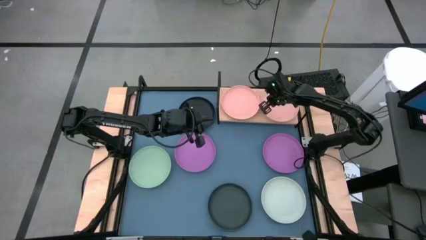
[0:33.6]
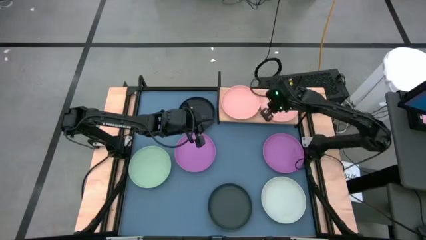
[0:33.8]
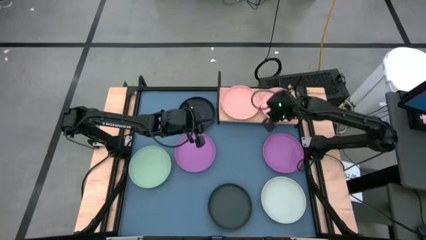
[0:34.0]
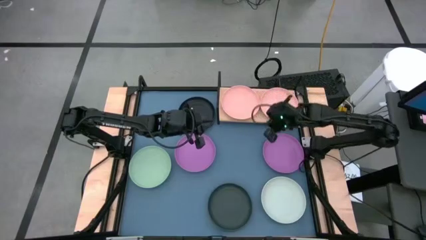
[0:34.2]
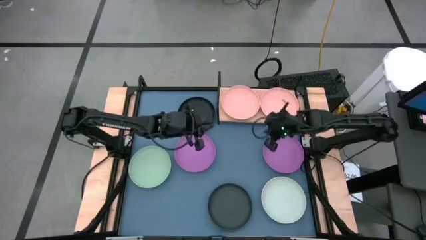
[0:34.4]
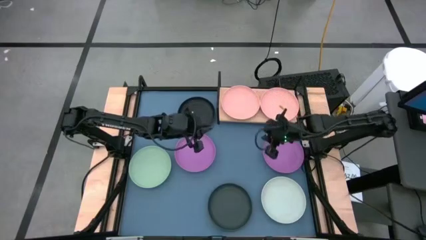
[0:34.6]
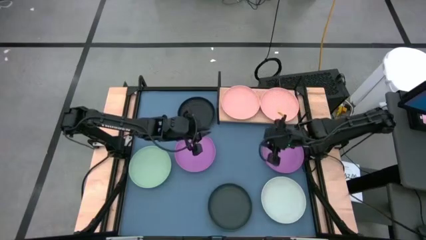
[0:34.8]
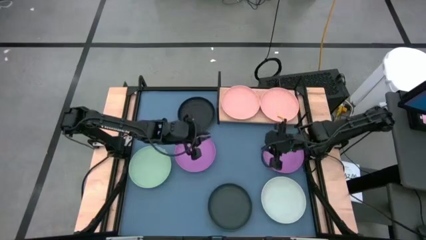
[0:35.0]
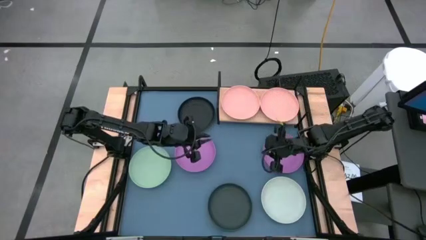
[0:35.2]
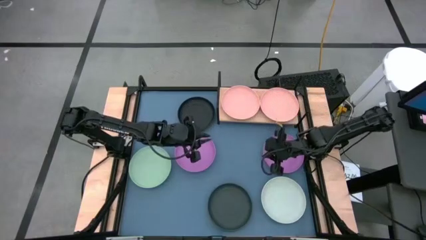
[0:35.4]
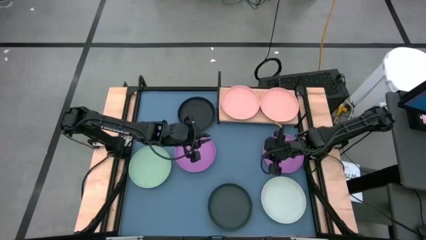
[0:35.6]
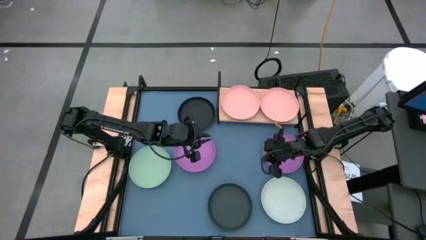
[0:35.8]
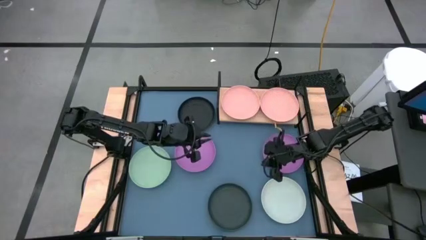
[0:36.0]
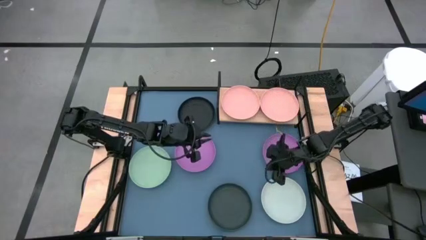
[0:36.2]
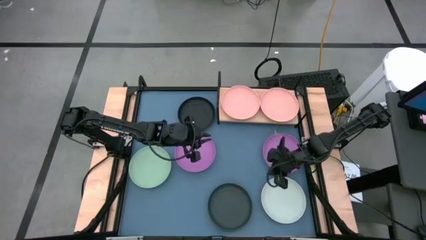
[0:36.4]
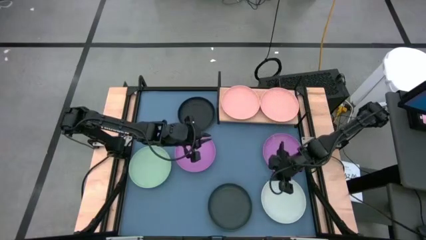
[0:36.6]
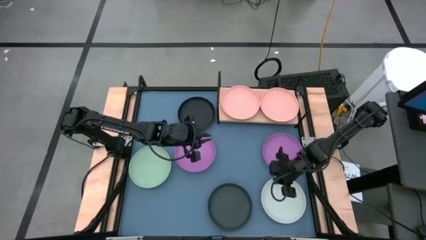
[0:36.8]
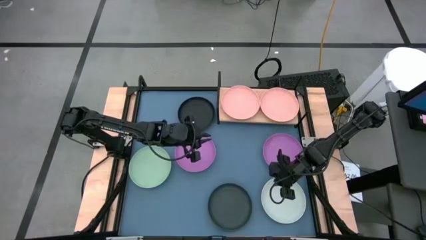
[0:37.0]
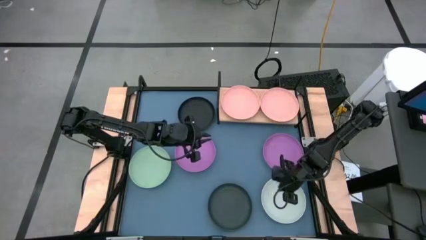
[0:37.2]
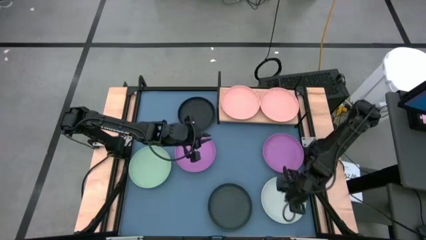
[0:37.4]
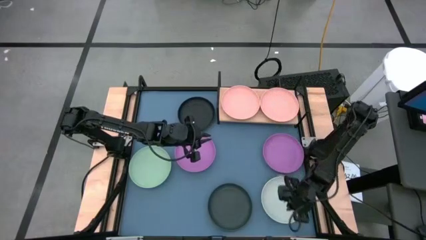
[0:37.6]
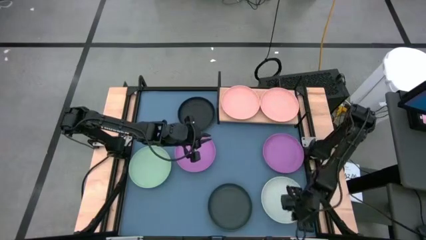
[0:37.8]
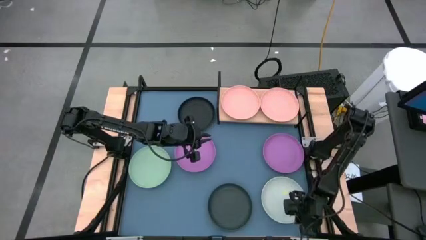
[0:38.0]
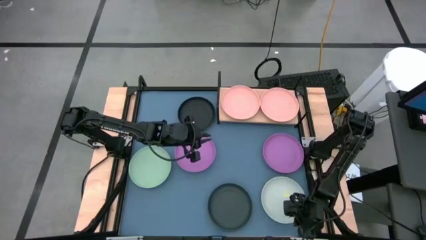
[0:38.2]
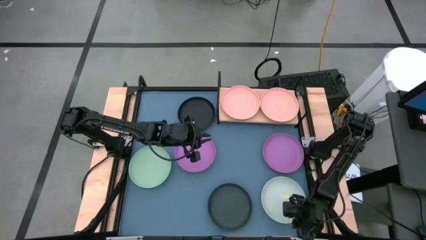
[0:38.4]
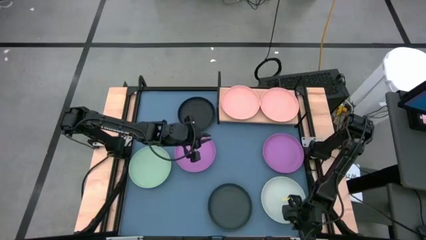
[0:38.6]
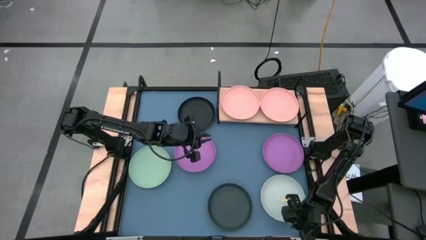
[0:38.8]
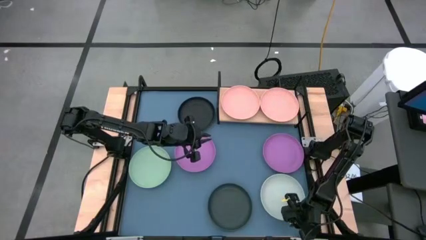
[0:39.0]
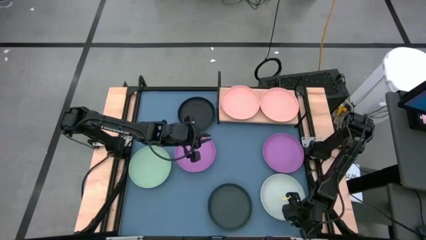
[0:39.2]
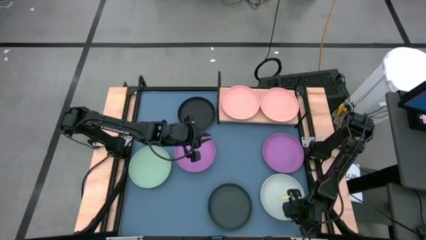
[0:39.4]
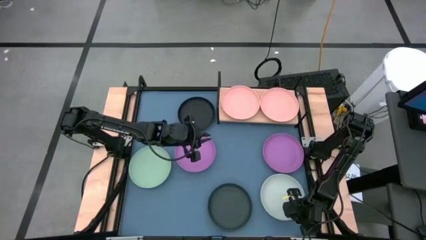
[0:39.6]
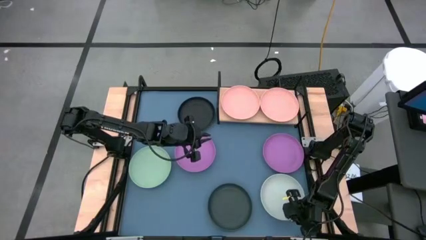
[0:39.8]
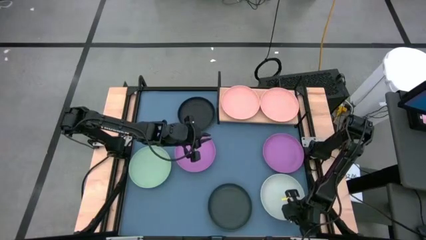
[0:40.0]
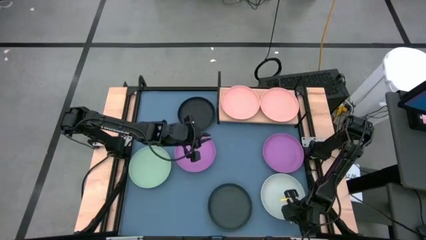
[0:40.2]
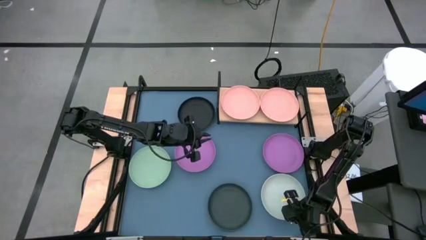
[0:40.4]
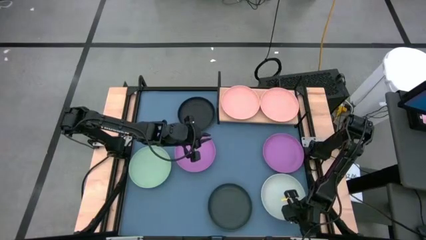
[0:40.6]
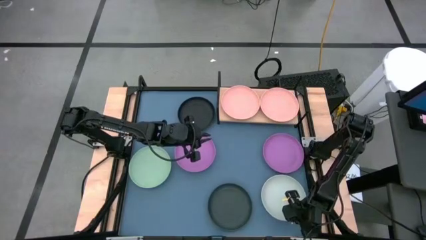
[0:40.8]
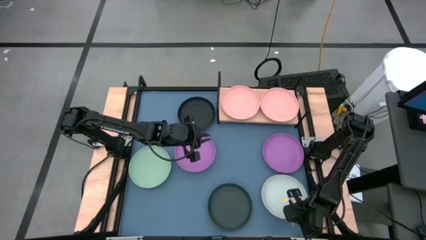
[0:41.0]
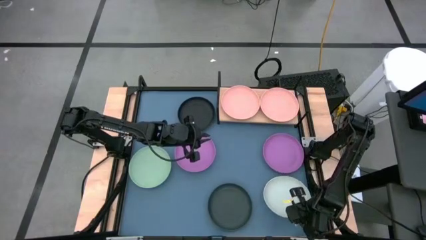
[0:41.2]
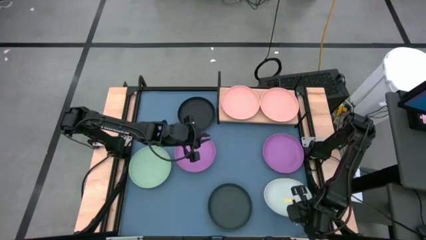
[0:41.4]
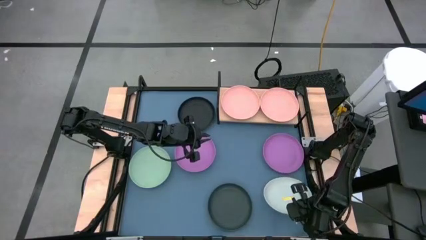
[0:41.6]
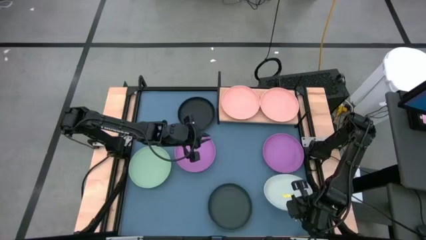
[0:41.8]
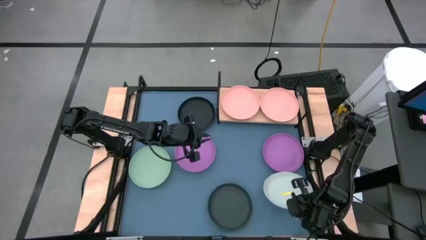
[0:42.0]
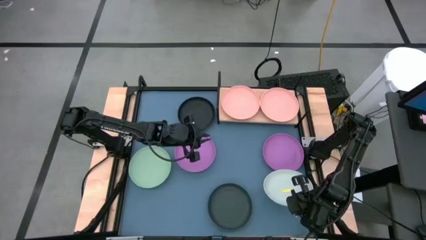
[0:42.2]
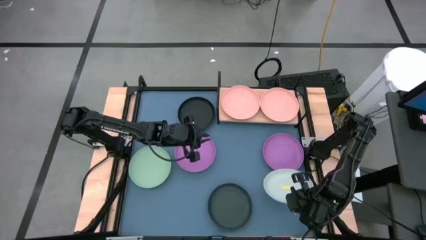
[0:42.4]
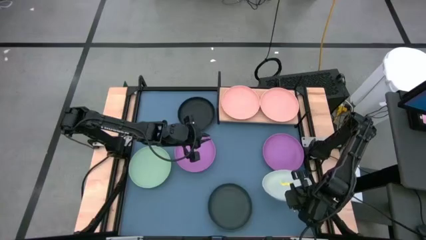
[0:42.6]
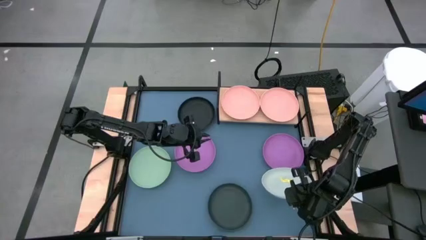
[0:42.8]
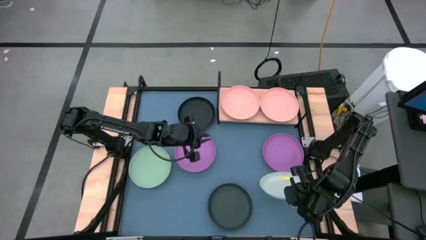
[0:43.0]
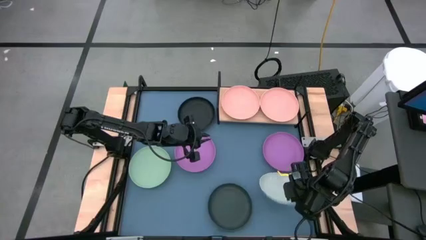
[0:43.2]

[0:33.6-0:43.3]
Task: Place and stack plates onto a shelf
Stack the blue plate on top of the pink plate on the shelf

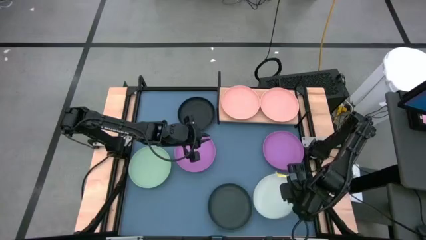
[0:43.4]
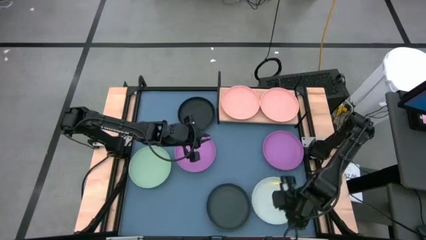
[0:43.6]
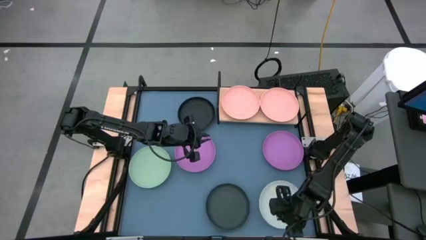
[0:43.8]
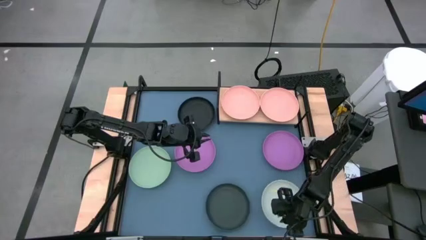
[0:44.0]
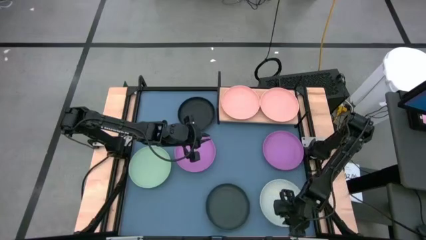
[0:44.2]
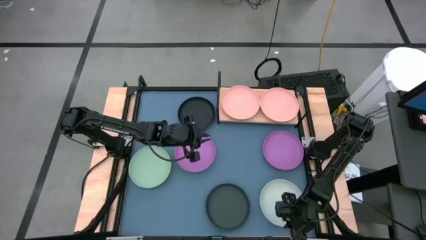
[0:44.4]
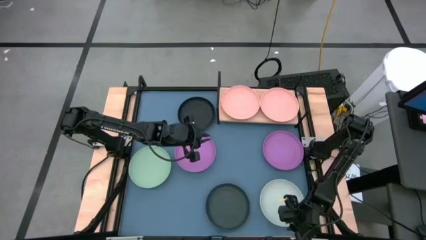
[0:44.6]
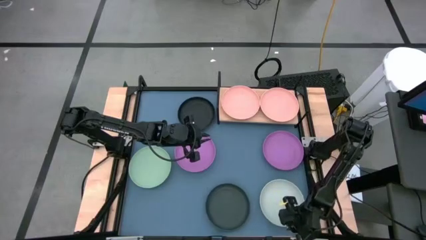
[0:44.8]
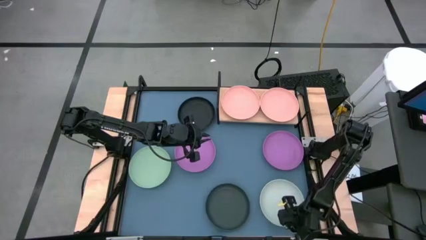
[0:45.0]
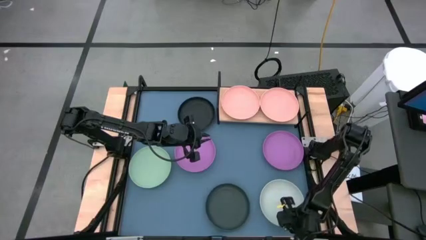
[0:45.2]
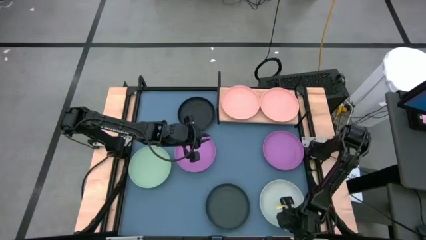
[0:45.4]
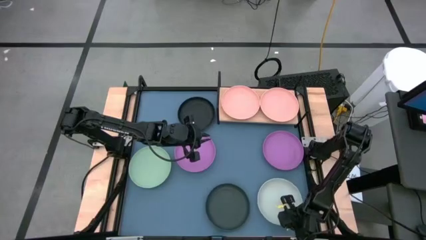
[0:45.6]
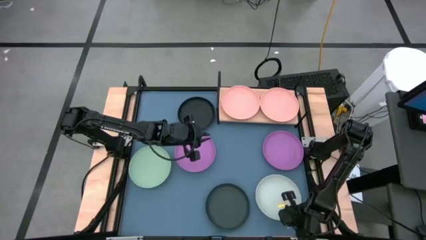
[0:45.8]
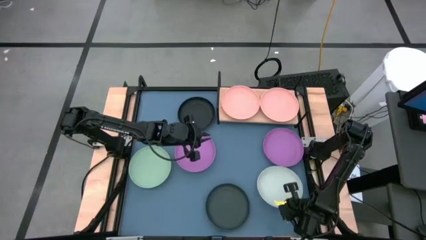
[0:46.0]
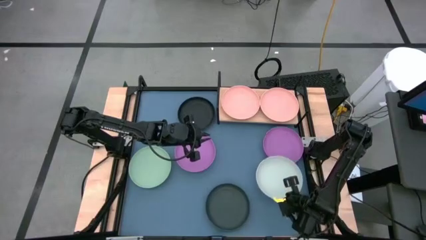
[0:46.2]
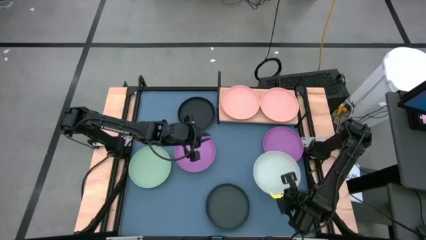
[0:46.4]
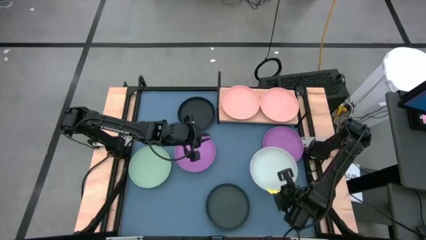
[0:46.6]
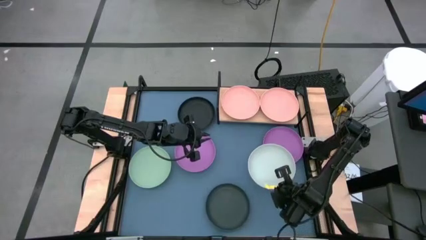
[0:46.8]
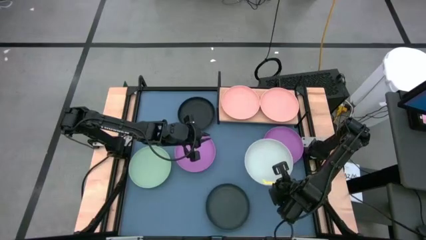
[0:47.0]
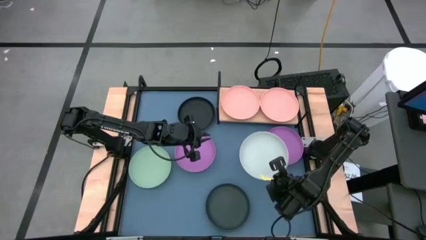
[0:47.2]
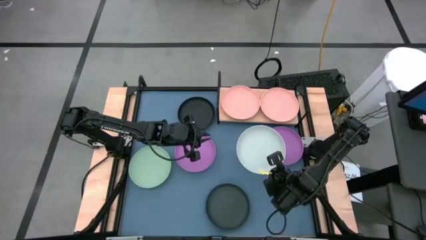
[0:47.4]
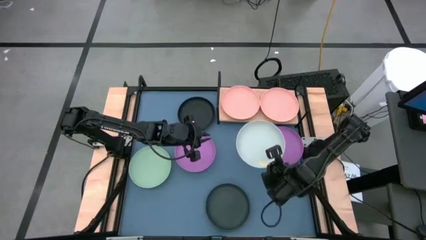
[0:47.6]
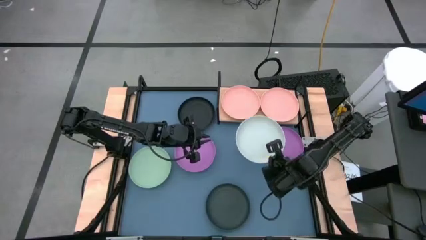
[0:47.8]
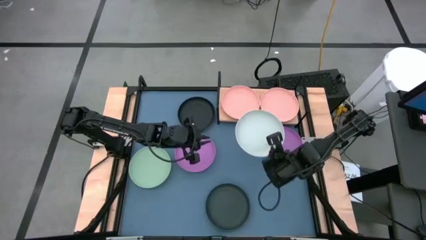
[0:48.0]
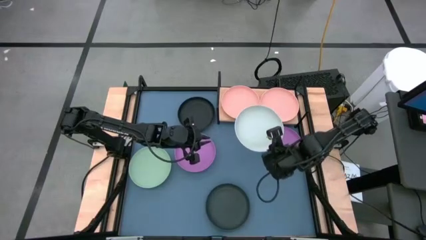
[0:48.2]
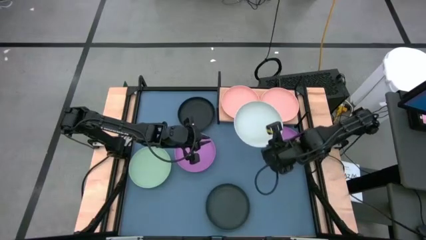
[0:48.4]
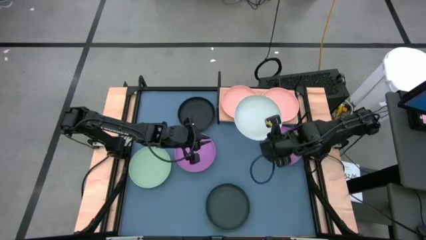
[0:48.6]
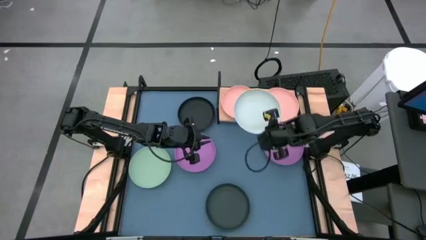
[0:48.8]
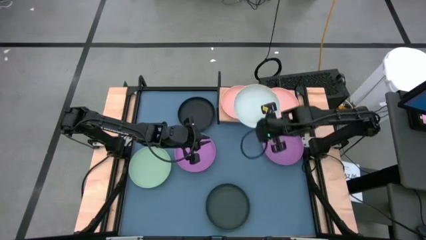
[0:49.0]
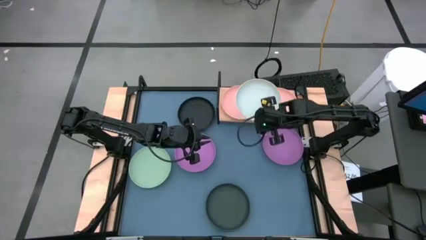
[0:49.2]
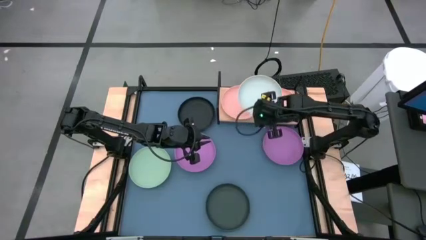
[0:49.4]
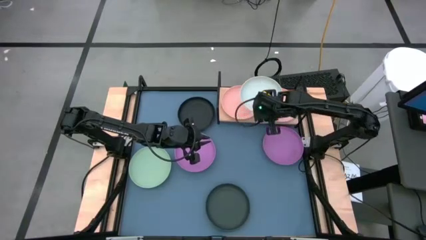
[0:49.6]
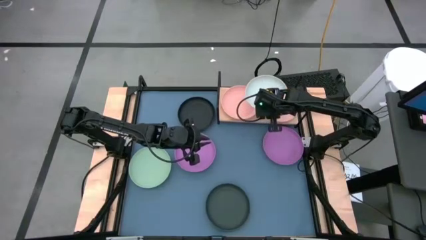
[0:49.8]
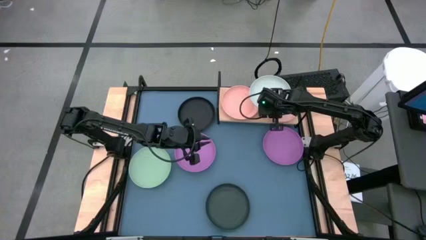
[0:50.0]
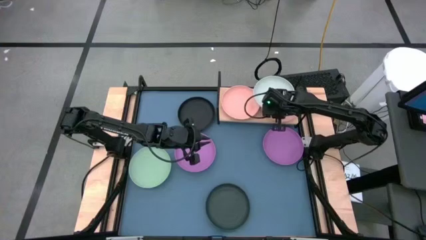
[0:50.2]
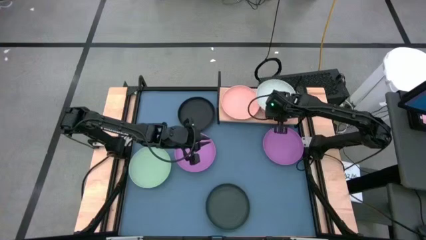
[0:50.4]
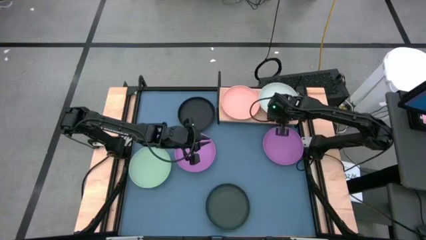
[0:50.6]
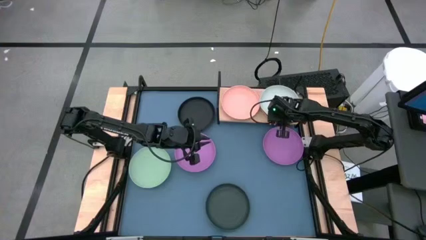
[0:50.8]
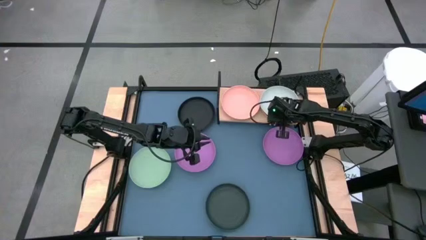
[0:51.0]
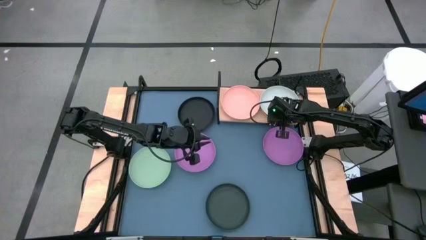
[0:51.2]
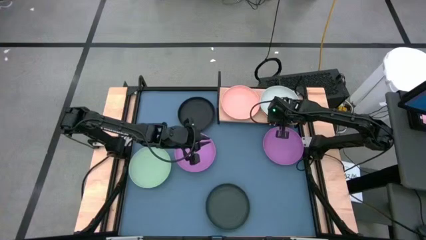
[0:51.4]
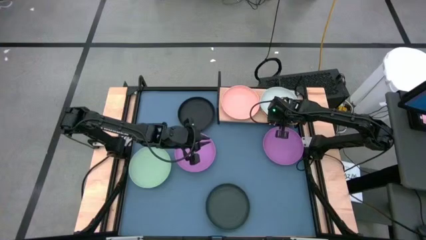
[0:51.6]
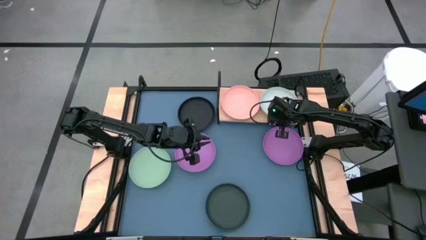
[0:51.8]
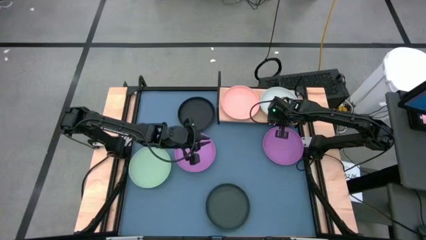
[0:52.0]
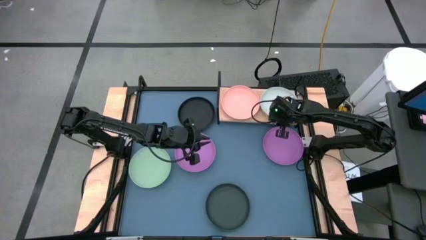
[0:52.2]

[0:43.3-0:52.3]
Stack the blue plate on top of the pink plate on the shelf
